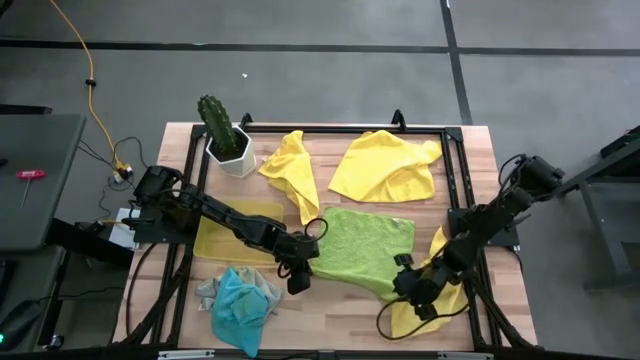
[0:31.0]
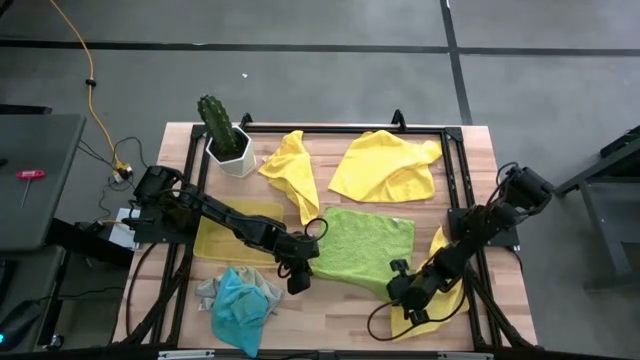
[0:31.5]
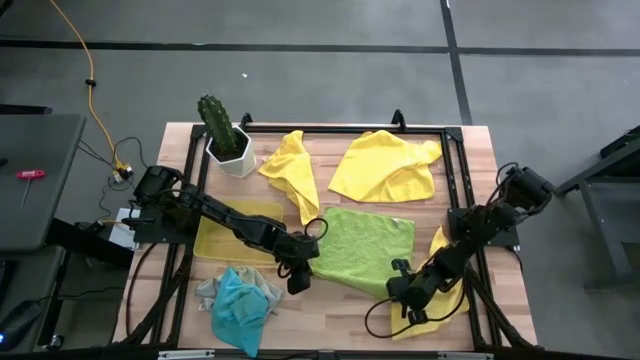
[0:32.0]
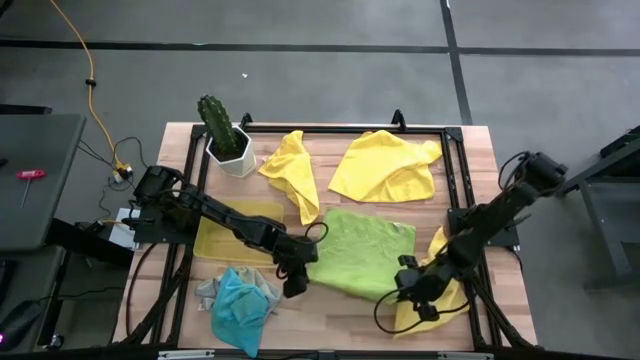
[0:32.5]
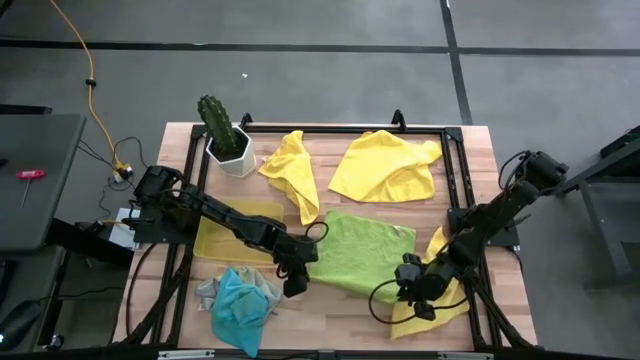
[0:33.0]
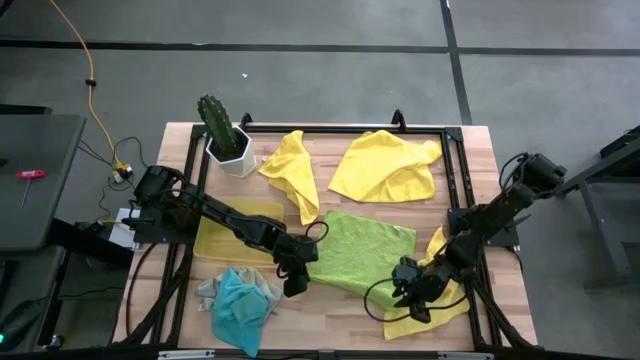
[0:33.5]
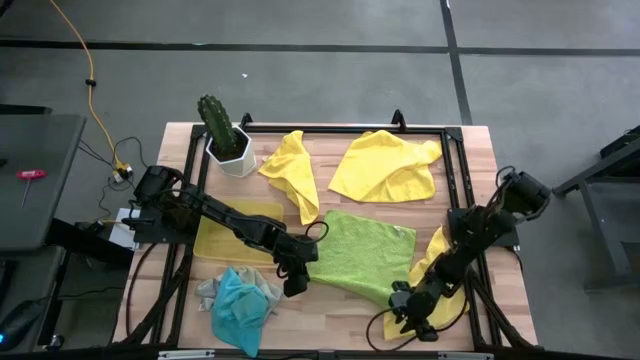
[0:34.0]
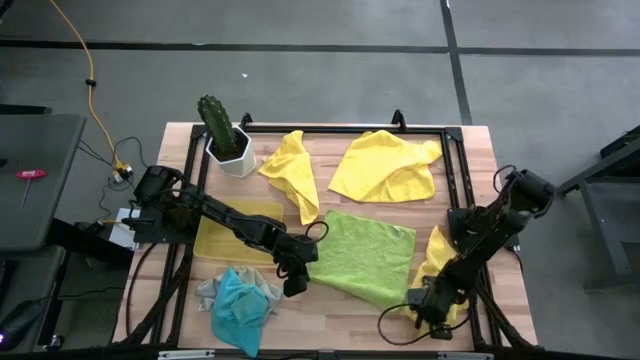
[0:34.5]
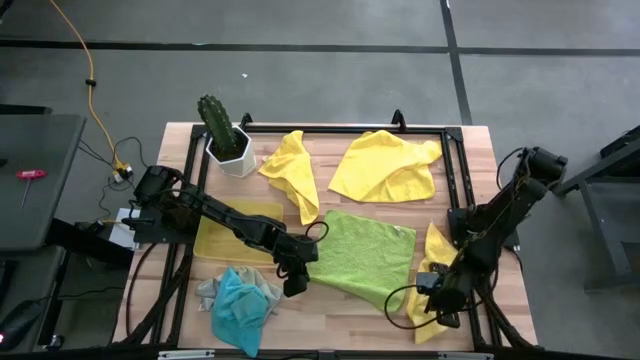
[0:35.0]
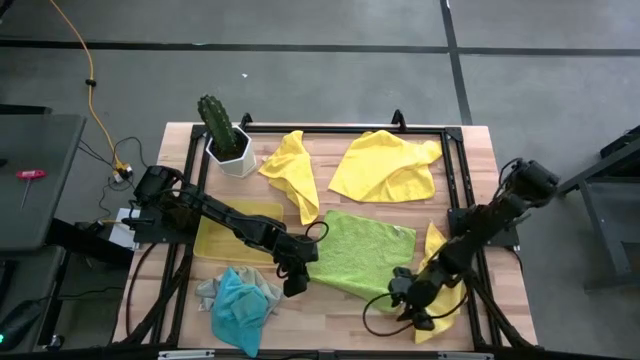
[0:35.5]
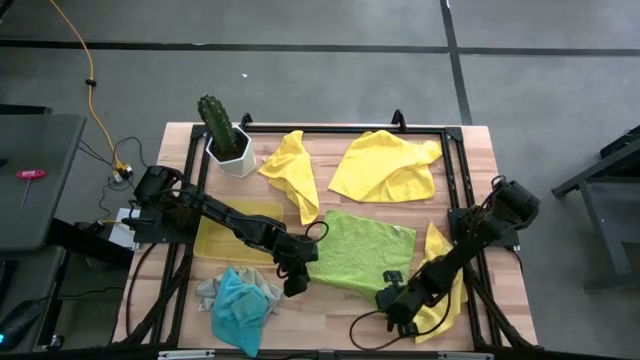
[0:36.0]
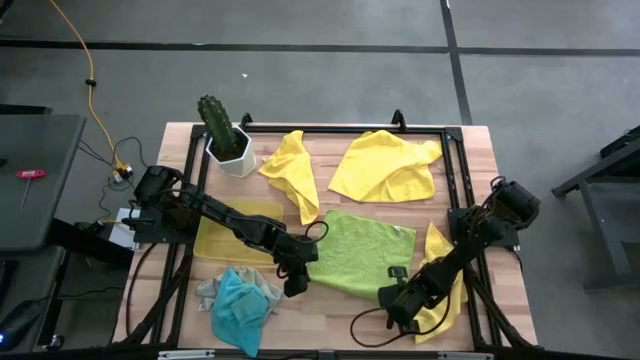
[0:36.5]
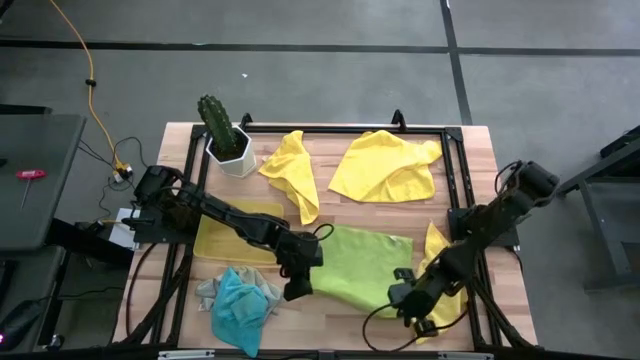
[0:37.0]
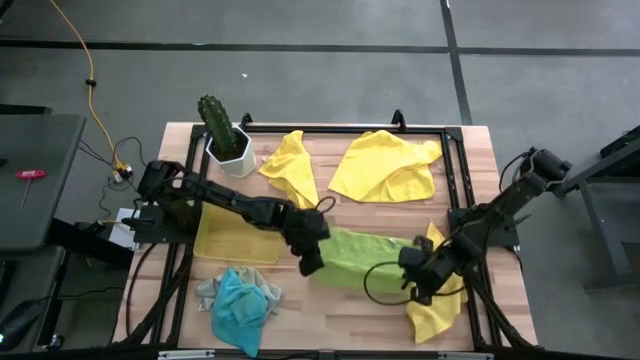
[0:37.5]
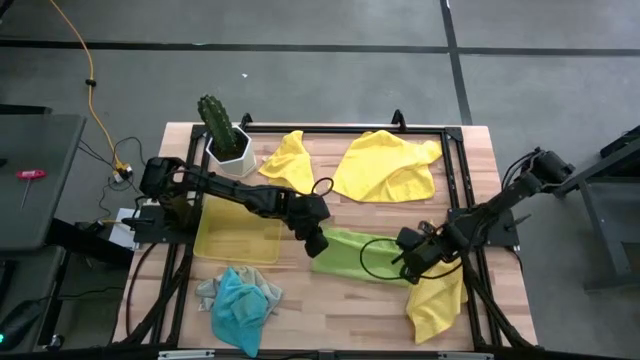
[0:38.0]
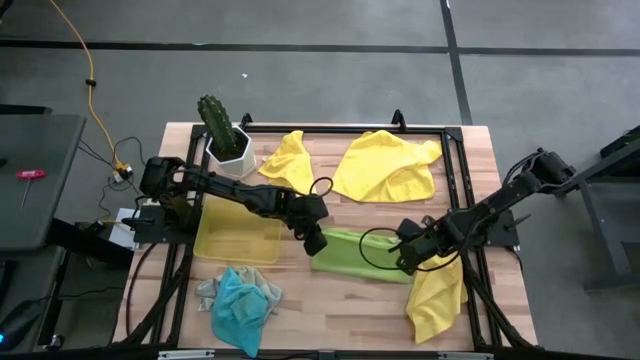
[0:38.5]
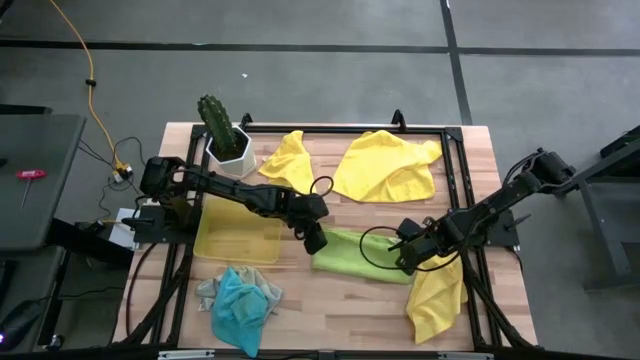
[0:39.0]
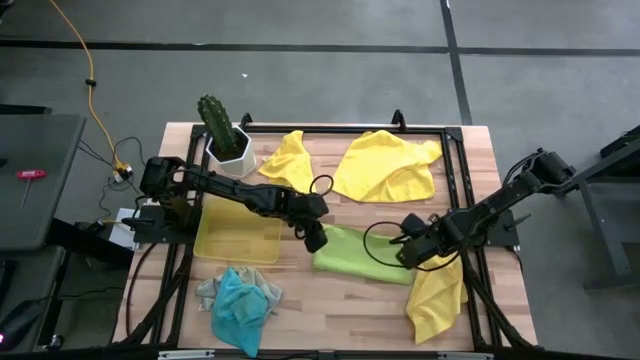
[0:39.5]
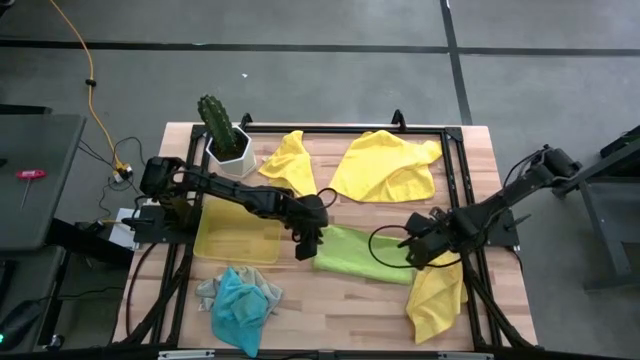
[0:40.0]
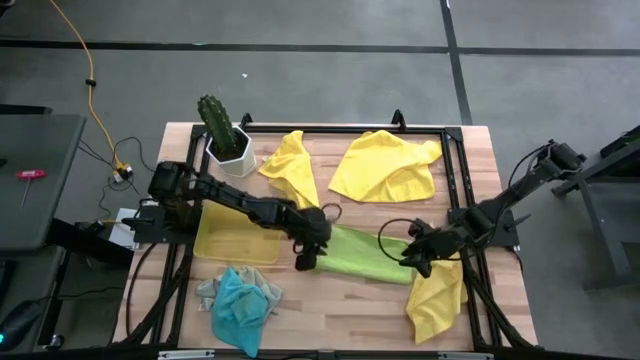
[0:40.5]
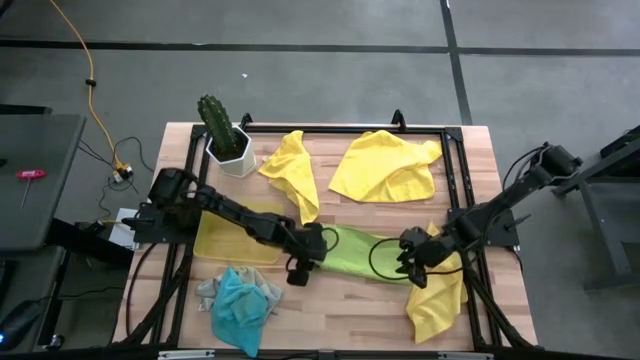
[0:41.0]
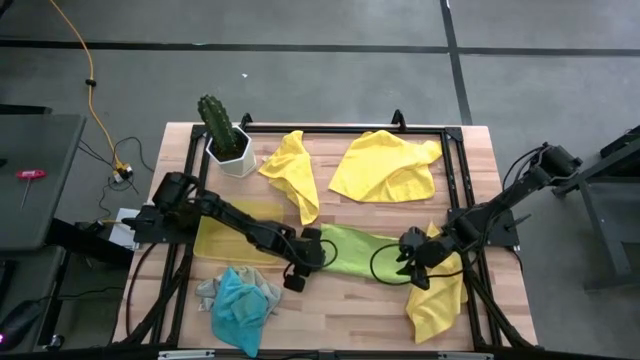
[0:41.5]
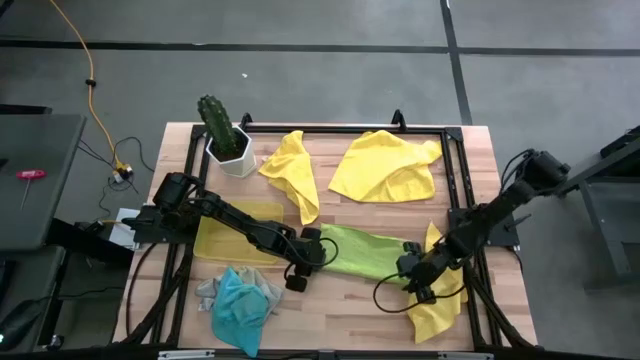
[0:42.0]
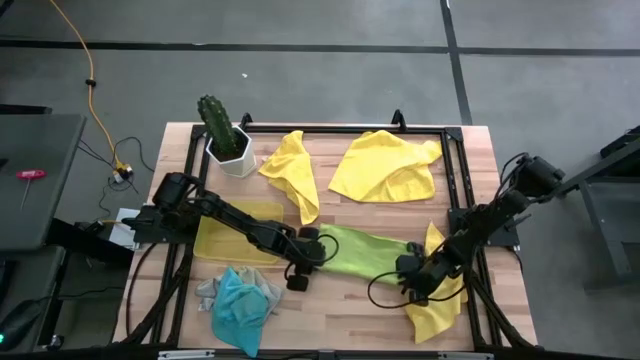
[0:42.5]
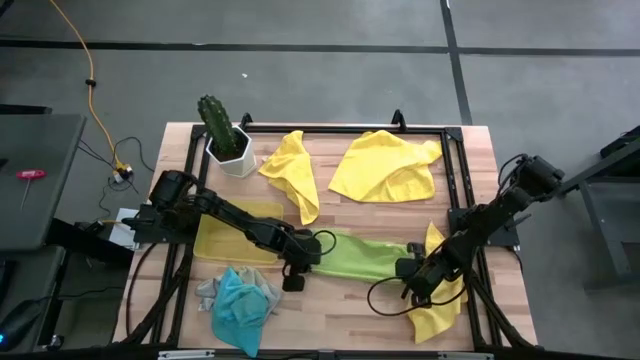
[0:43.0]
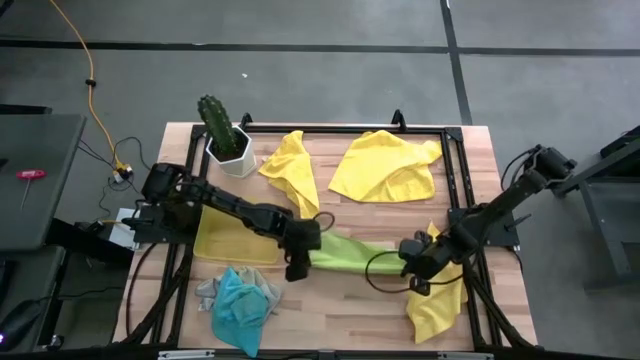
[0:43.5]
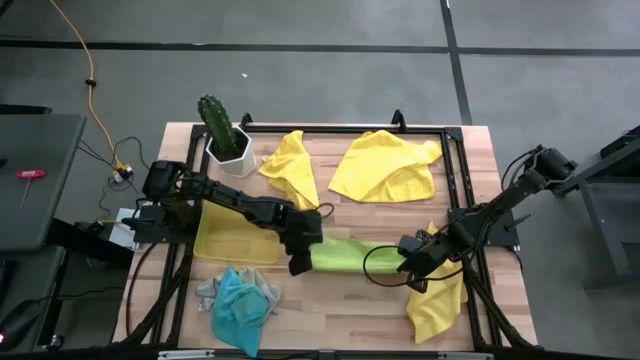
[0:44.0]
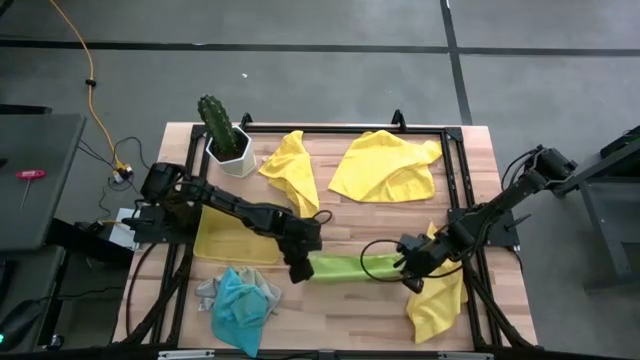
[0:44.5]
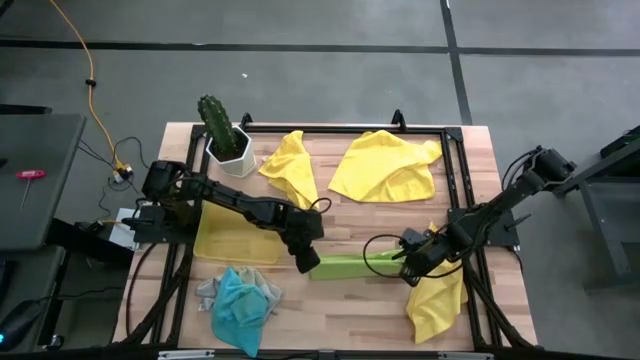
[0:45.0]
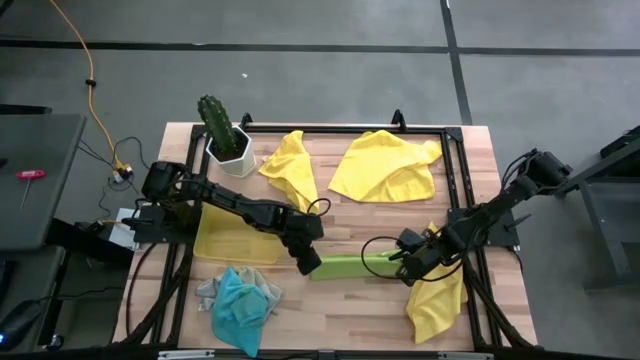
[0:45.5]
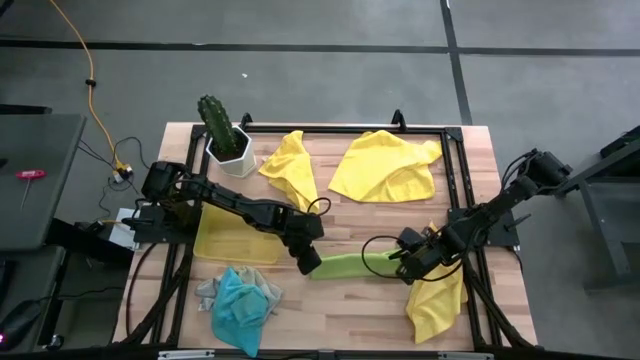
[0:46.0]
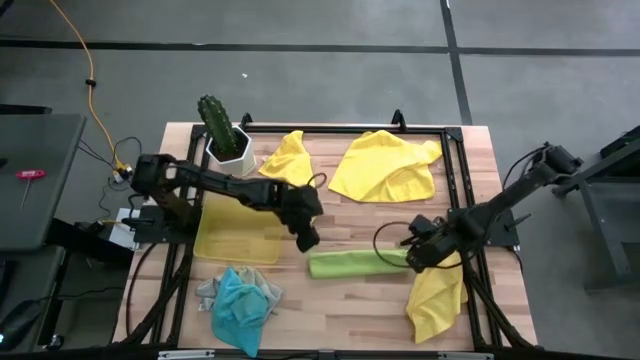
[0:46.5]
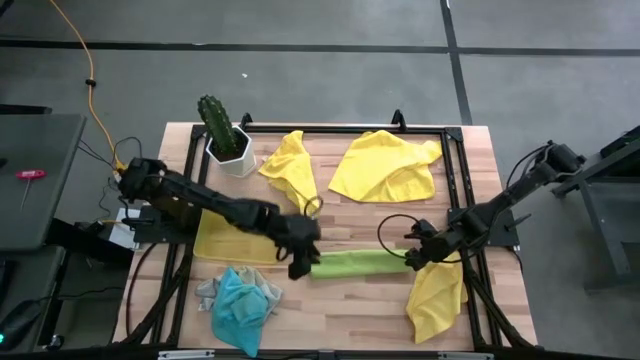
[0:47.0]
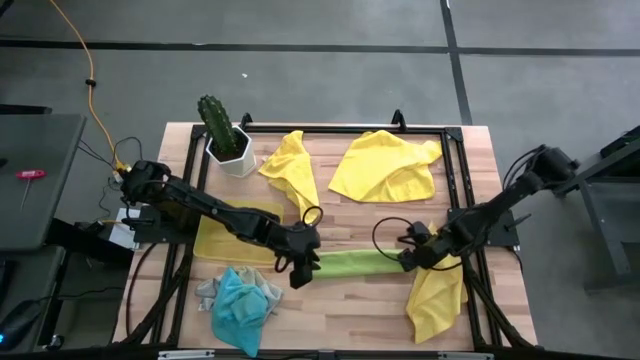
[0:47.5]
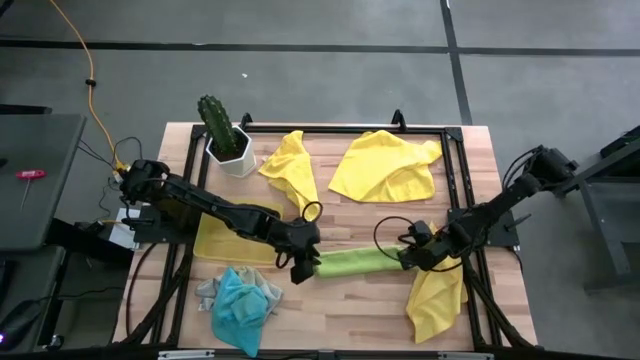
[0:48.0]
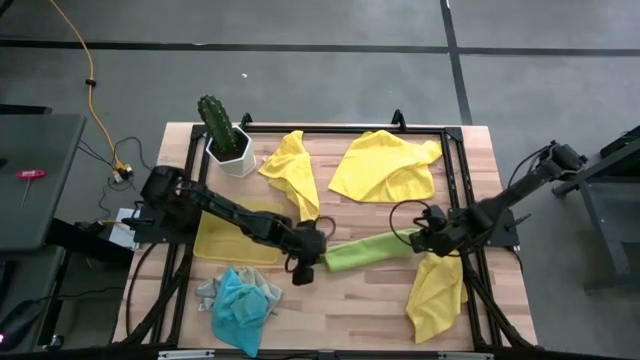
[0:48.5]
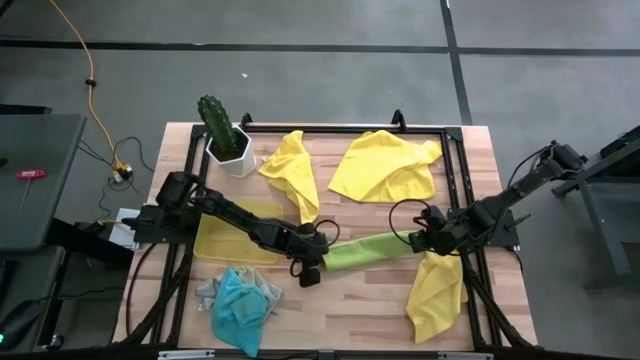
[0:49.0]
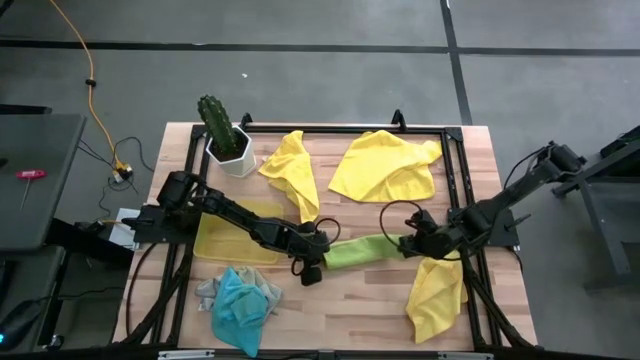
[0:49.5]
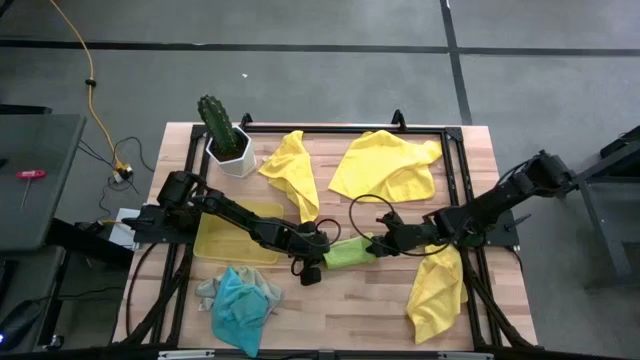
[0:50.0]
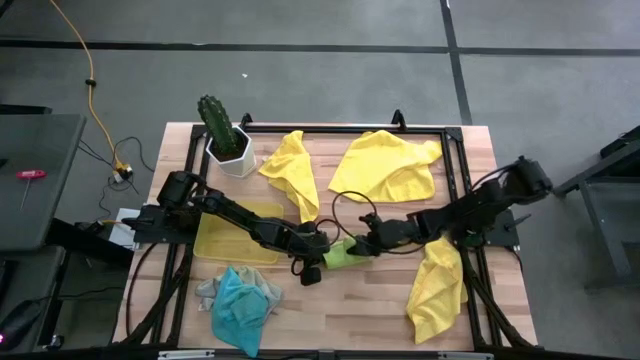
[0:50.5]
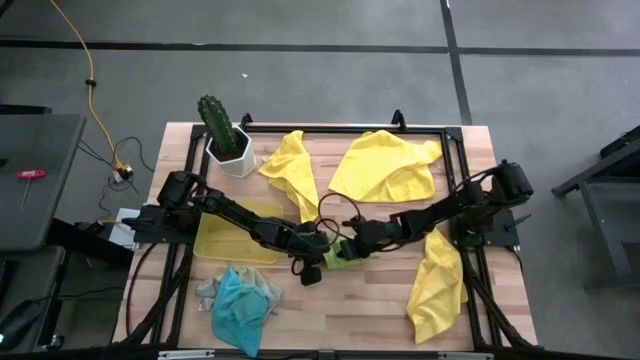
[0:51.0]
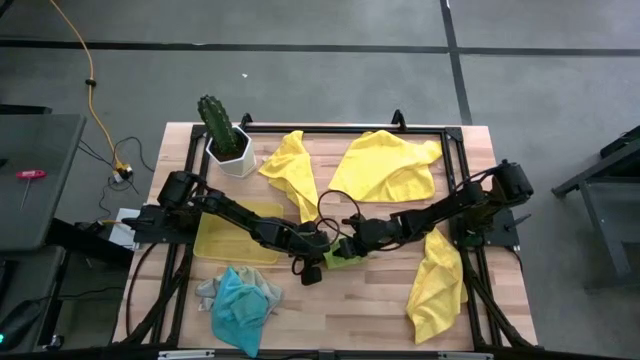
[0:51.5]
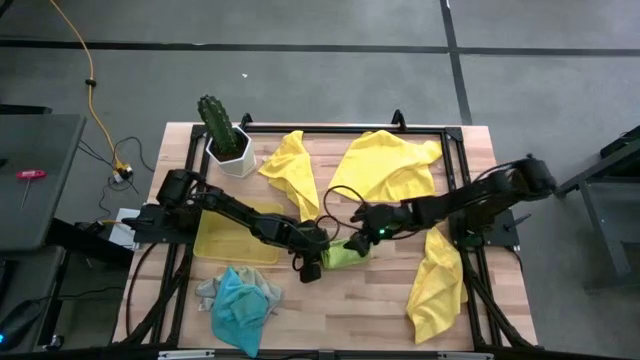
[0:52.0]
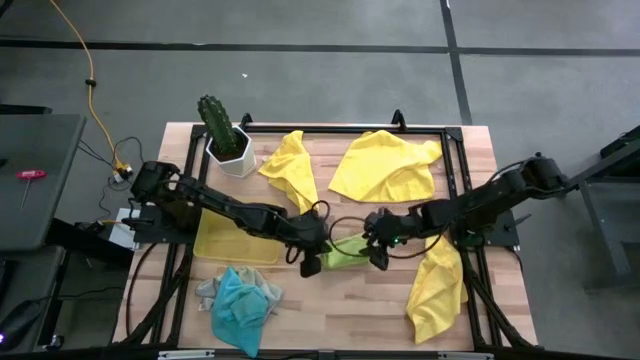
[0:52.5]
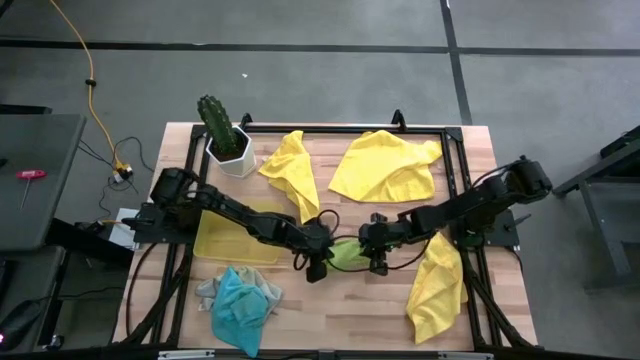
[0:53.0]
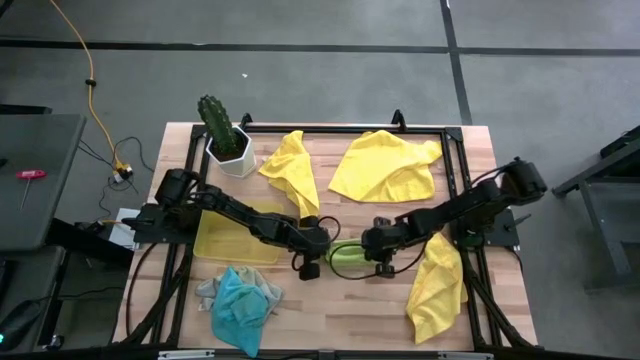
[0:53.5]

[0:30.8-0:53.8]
Task: Fold microfiber towels
Fold the green microfiber towel
